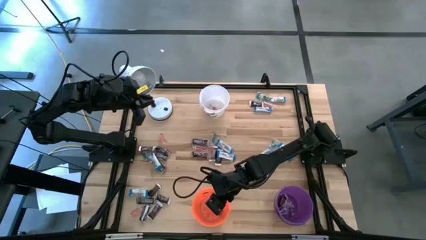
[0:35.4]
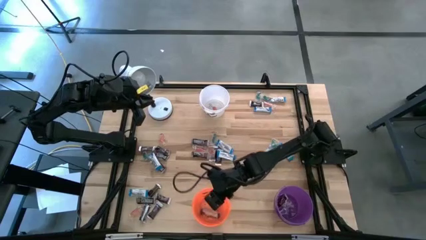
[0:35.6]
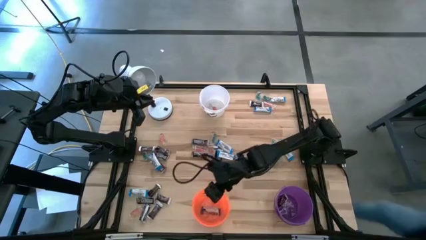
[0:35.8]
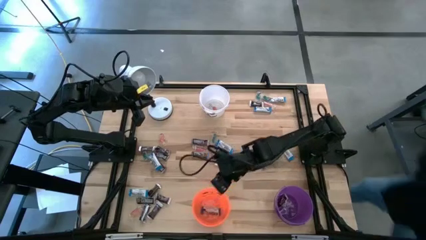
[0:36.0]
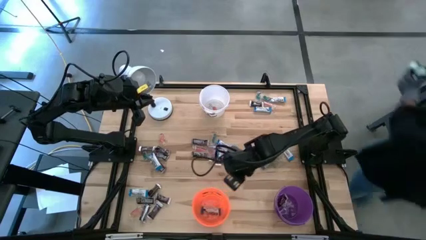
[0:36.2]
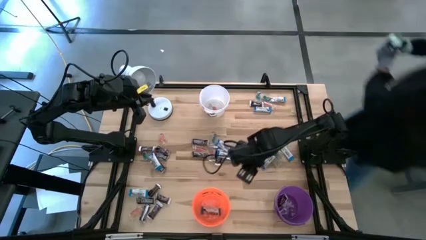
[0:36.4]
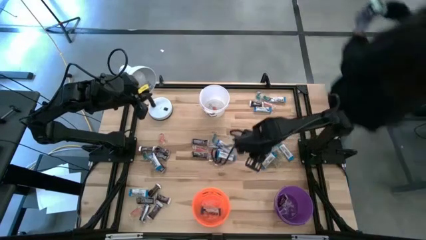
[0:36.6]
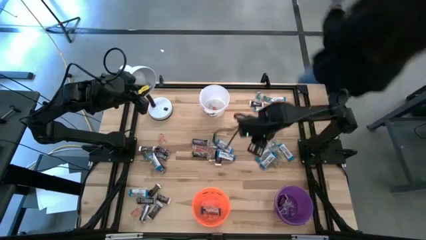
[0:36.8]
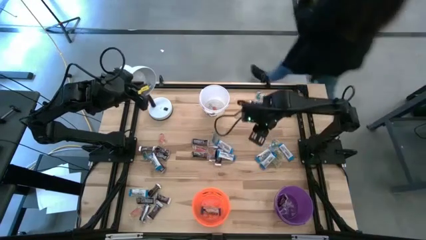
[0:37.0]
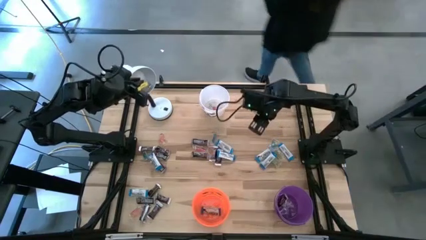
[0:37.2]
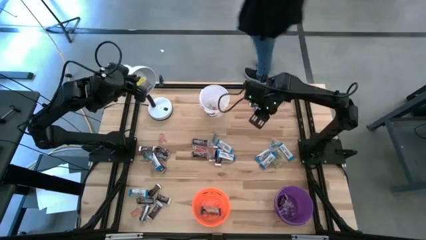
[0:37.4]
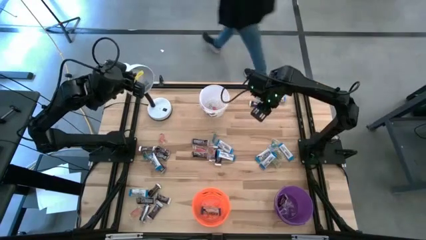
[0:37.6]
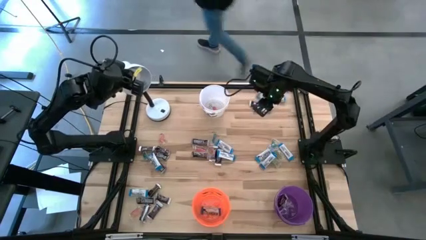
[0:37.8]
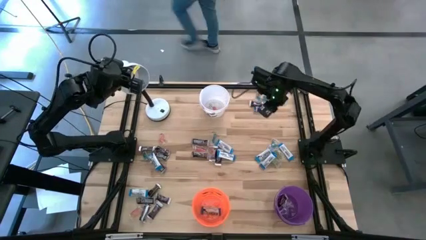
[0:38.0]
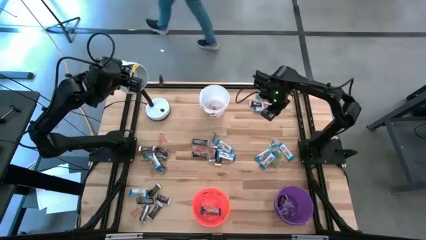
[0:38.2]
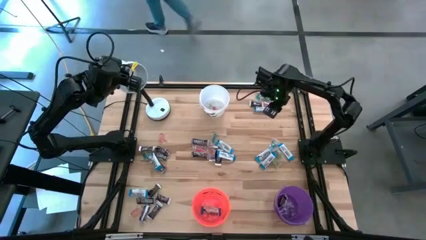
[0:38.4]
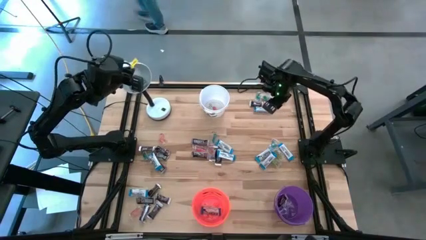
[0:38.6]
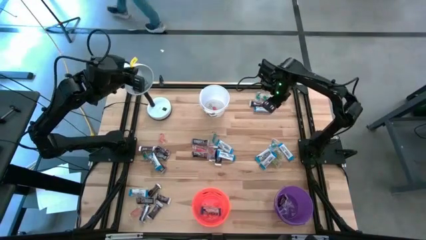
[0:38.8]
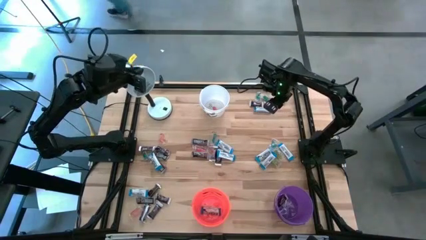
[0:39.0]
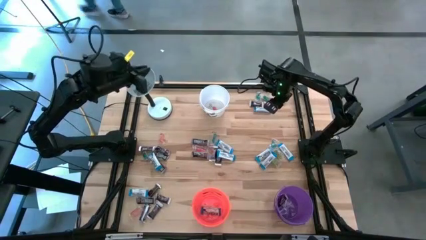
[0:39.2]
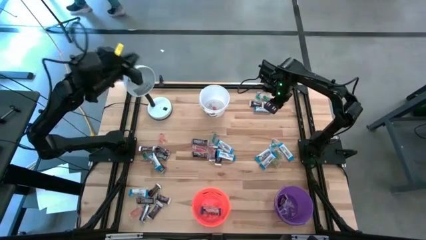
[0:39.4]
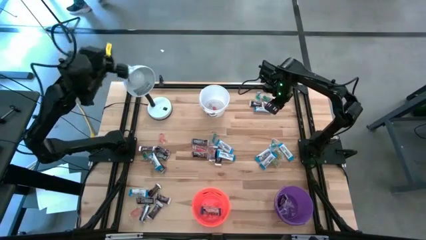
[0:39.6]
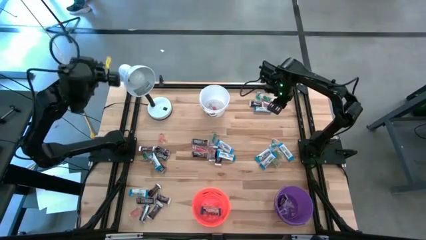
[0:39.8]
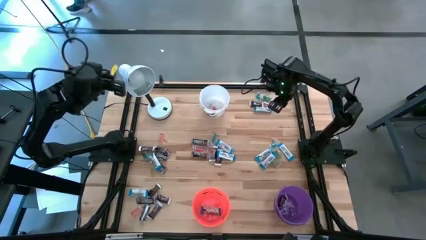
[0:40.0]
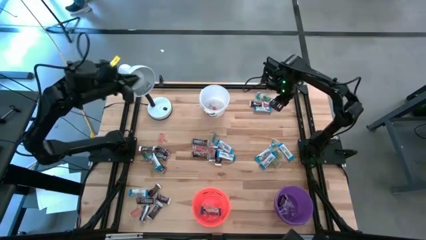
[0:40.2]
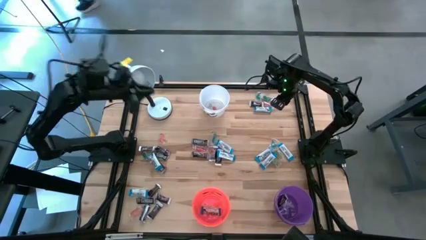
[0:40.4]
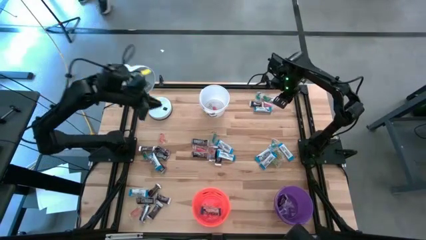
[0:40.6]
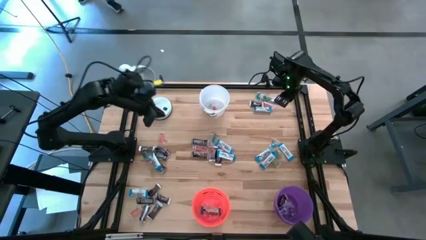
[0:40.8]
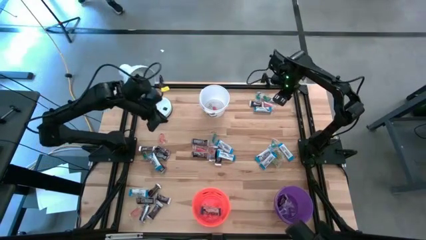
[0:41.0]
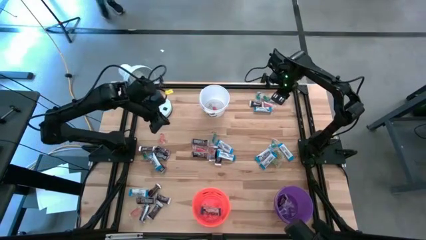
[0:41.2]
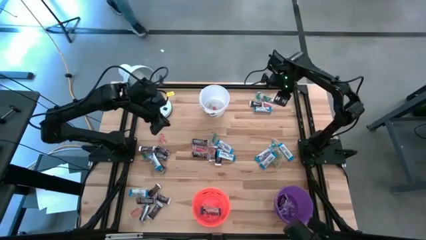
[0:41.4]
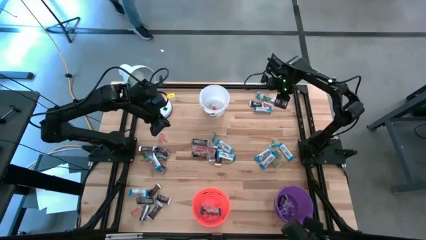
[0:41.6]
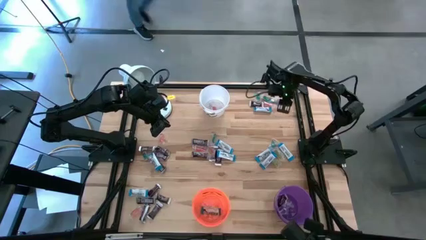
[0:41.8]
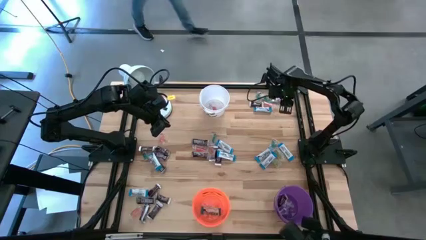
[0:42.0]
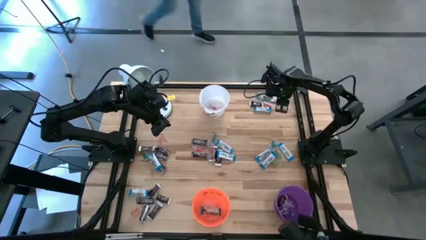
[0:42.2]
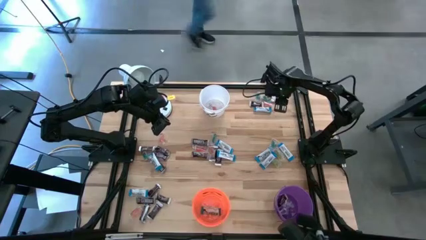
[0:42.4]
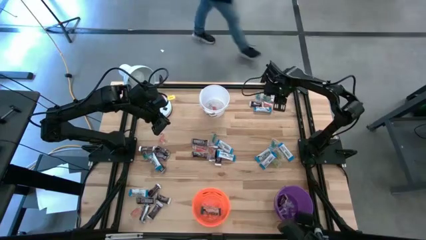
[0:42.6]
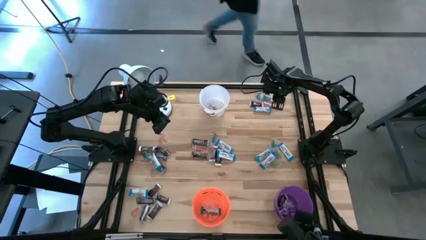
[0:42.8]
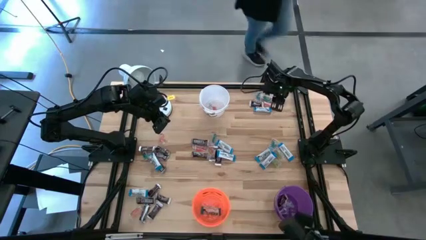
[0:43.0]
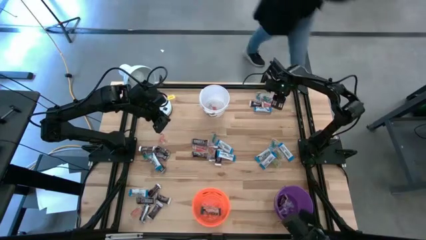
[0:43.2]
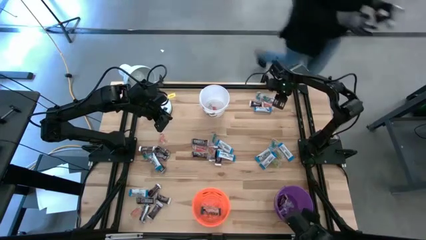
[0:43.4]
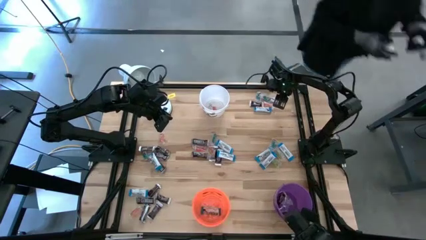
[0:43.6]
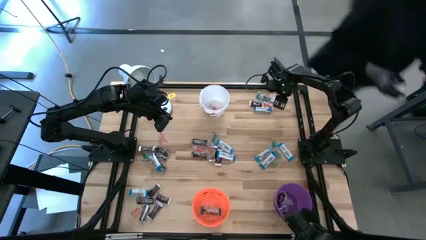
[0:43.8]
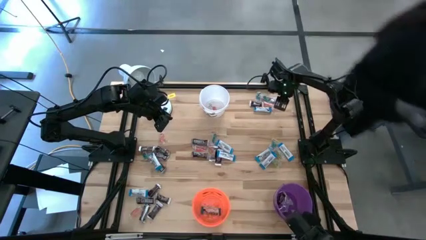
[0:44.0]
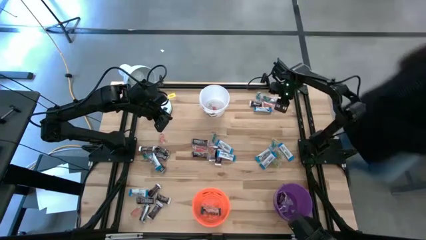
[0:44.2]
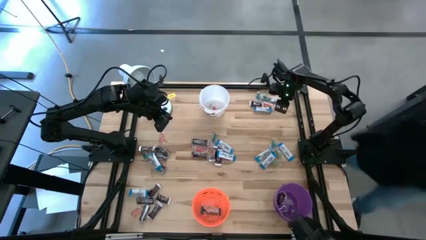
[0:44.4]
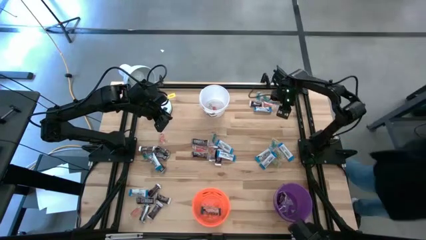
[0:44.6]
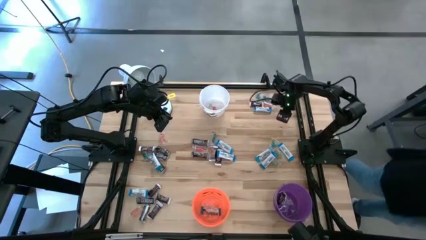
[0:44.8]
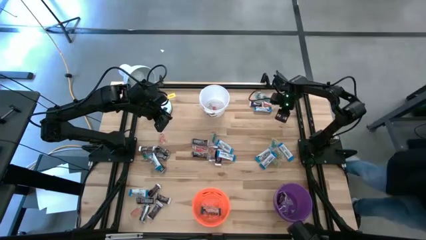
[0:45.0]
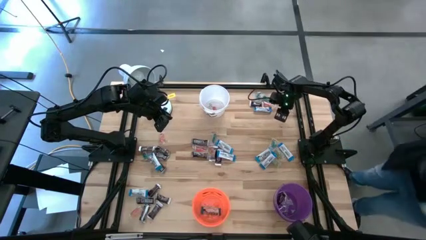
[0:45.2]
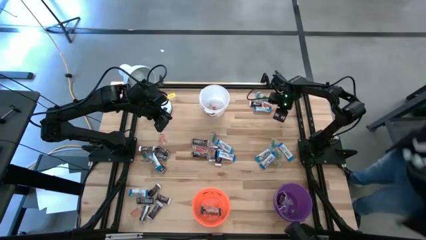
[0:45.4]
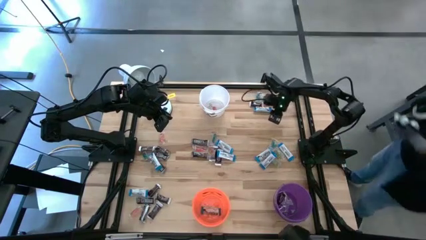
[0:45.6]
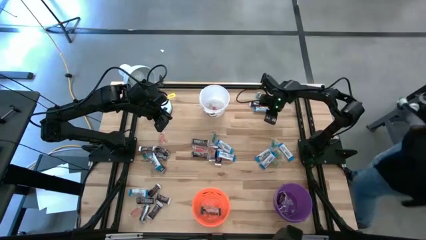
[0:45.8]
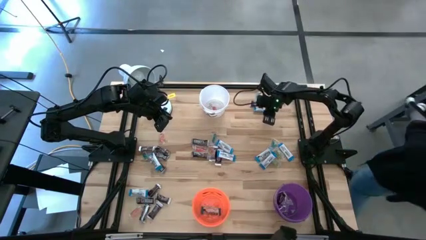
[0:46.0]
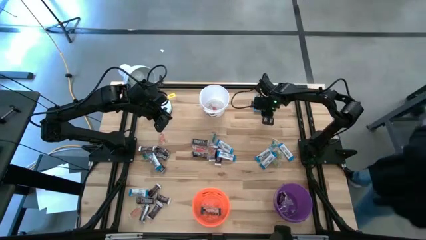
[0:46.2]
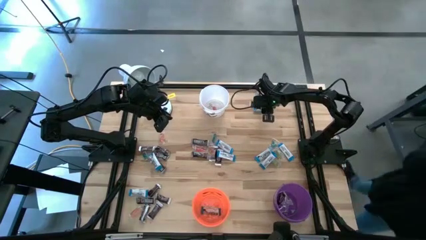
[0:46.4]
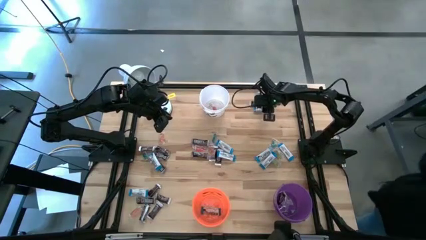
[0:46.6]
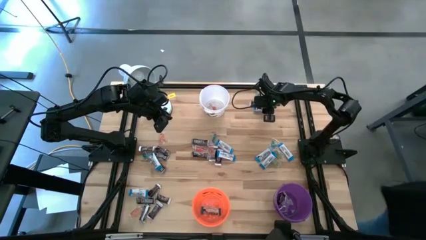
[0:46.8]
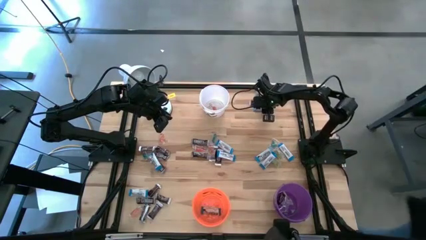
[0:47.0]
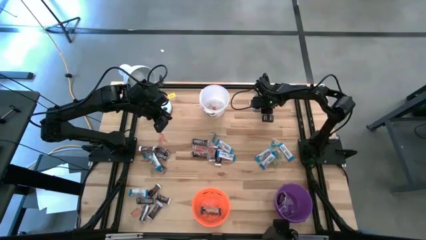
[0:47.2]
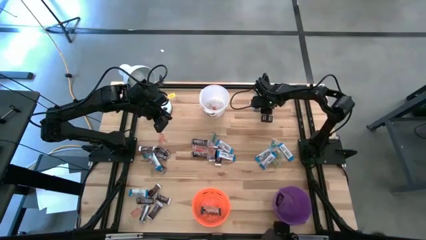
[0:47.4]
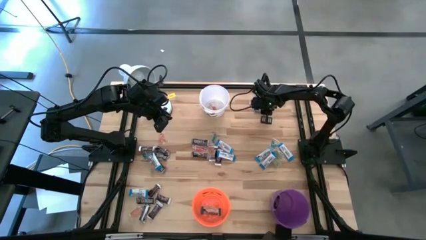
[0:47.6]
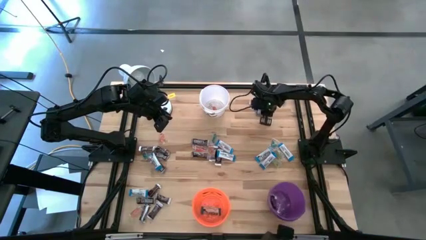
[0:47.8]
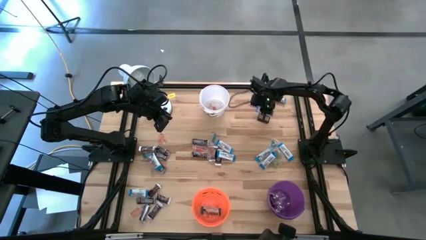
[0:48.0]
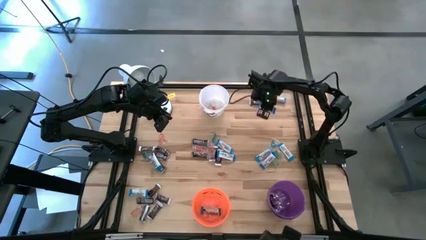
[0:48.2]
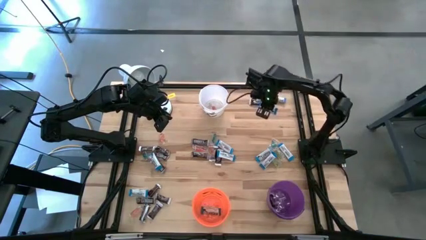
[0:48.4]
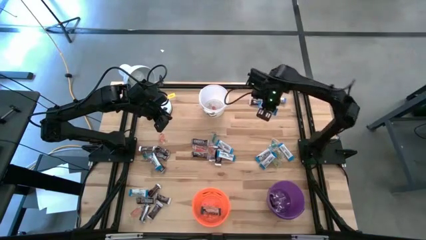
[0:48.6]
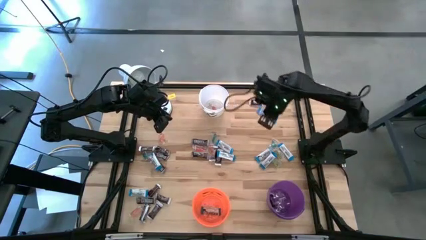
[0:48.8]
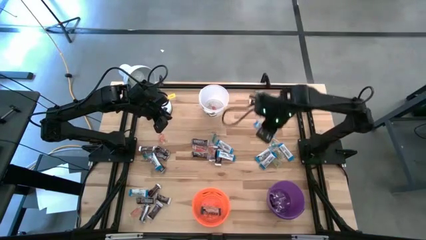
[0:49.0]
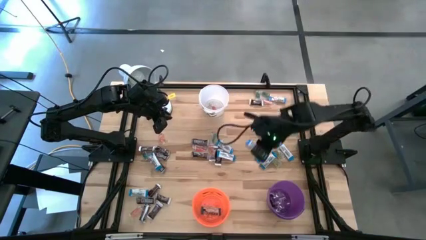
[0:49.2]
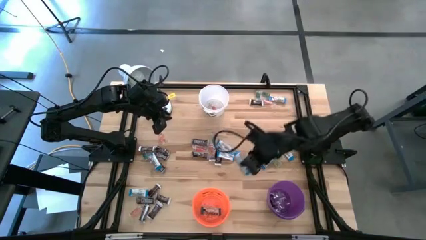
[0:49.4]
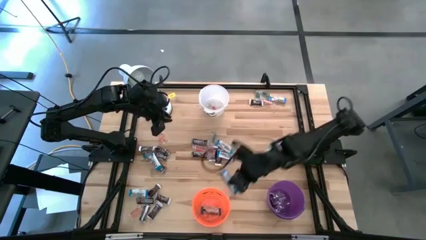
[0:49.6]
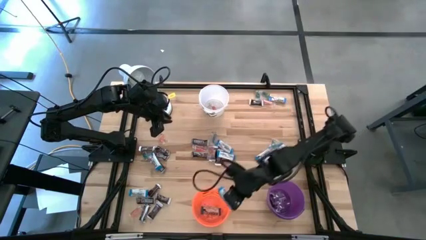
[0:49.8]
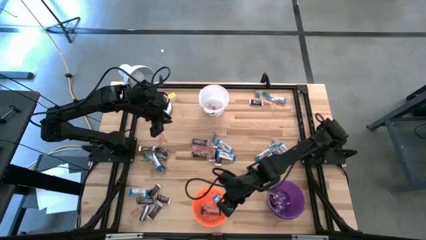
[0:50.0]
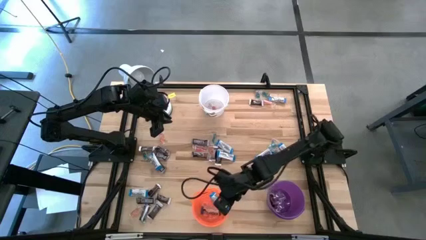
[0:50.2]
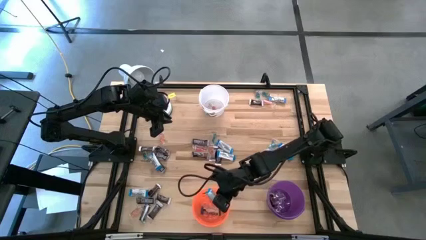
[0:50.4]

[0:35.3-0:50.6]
Task: Organize candy in baskets
Put the white chocolate bar into the orange bucket
